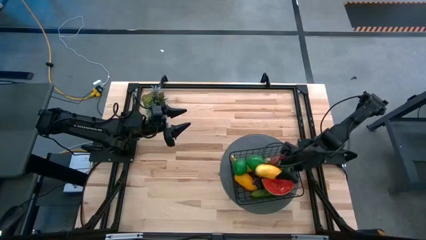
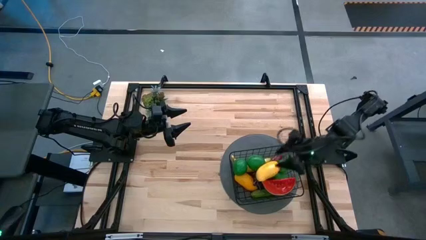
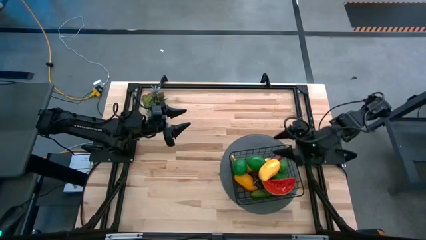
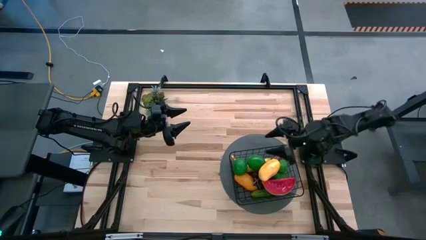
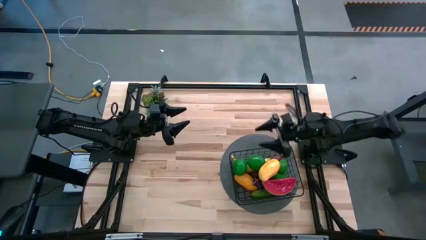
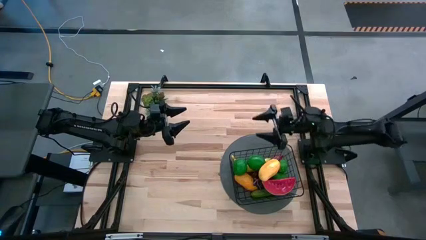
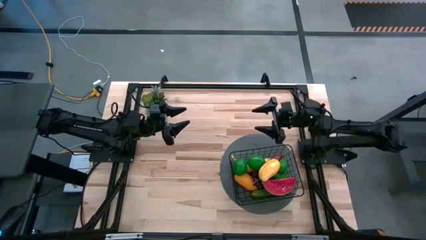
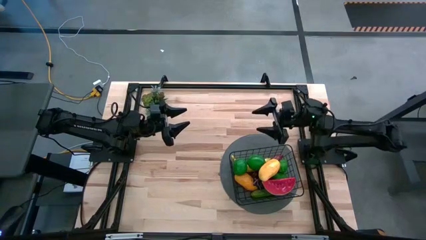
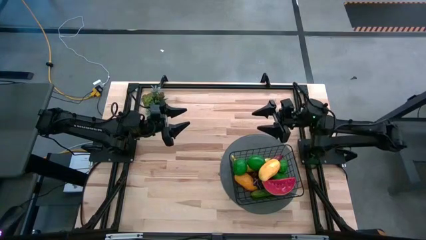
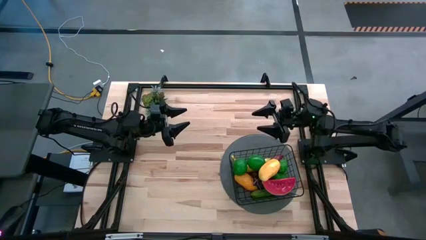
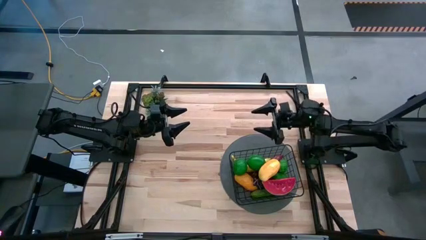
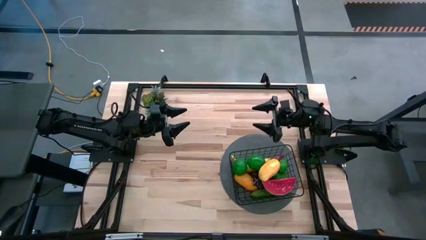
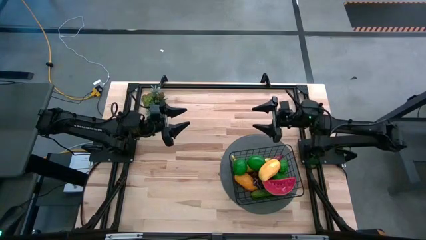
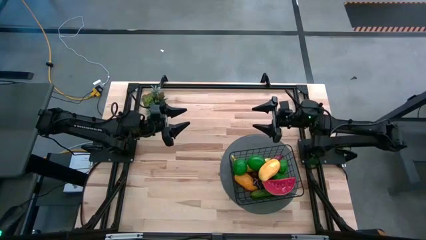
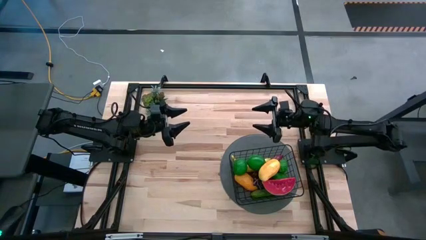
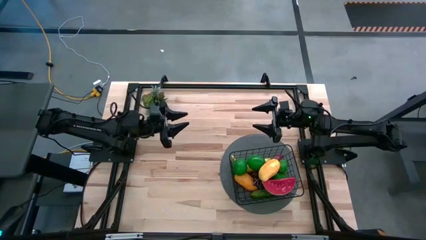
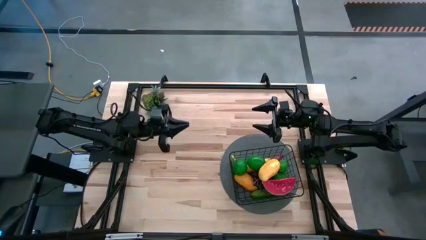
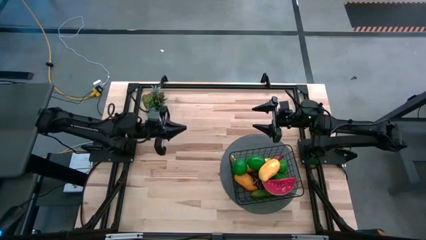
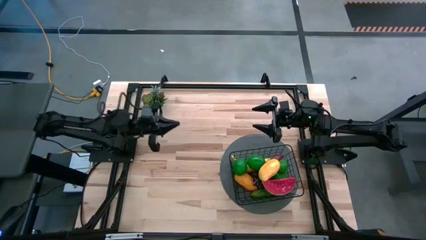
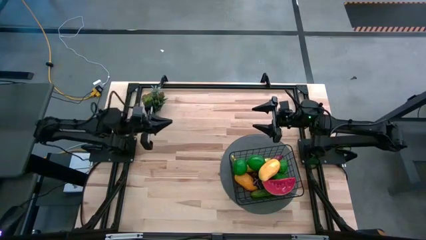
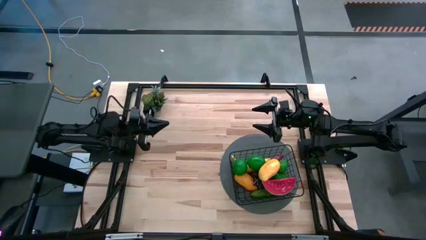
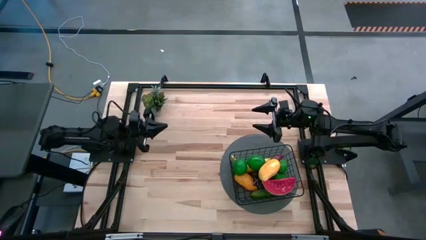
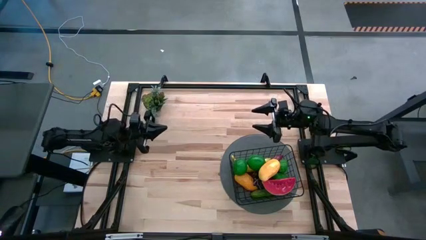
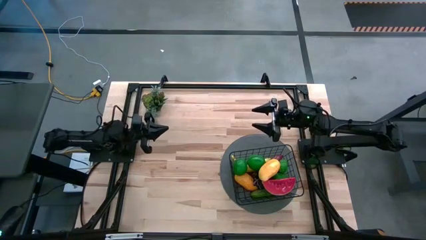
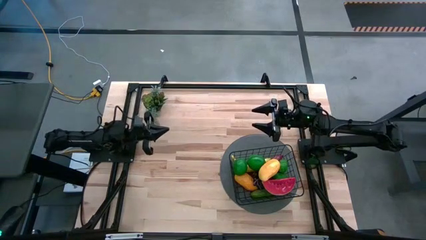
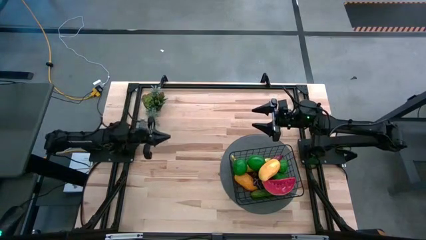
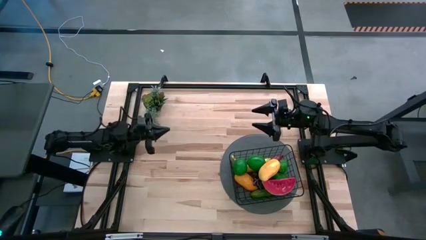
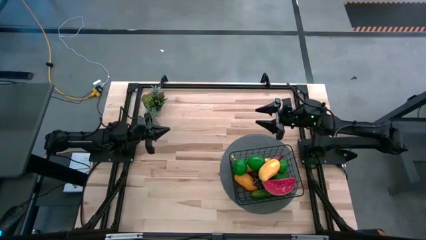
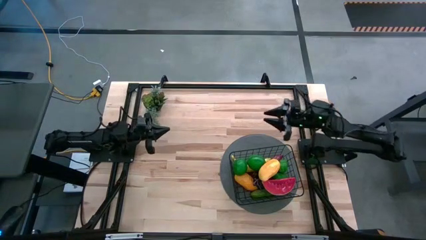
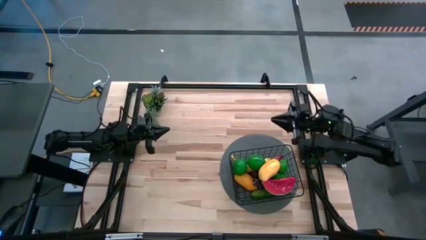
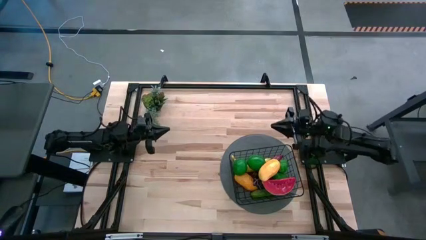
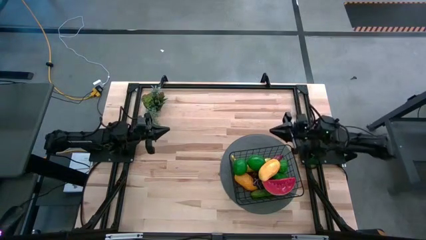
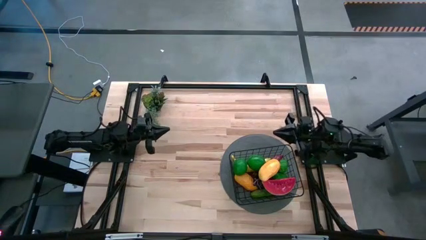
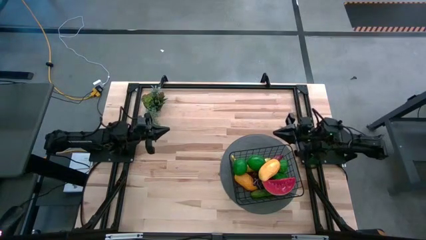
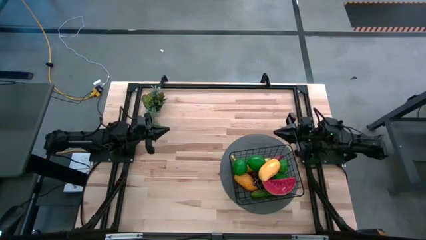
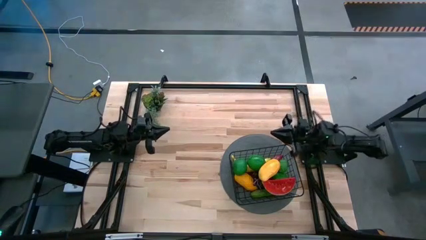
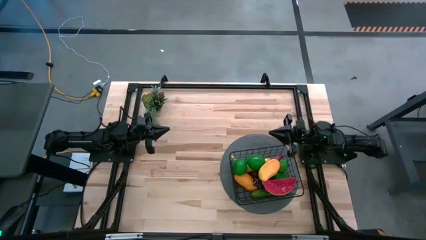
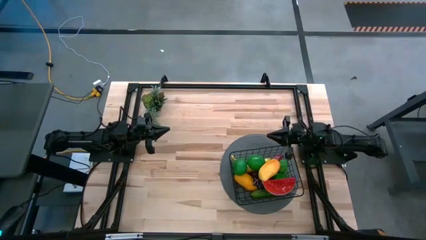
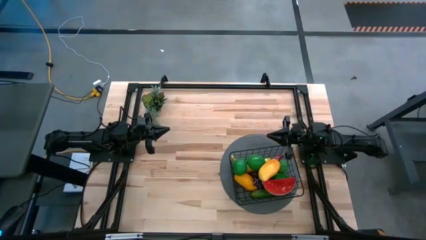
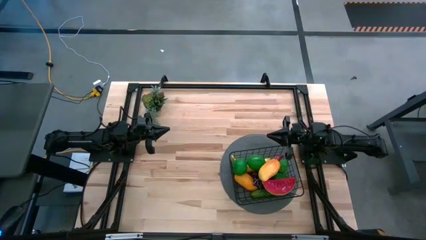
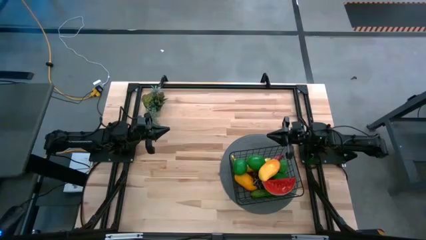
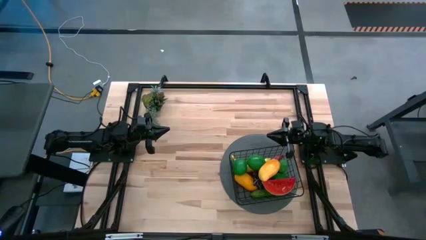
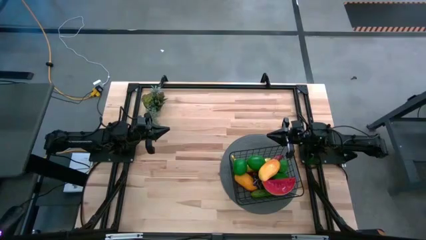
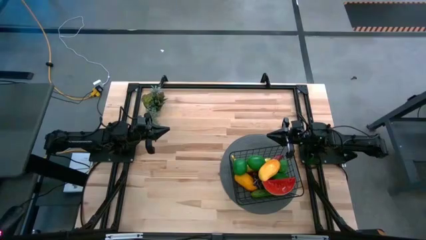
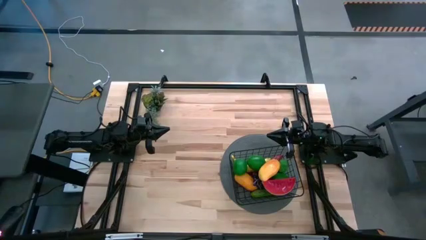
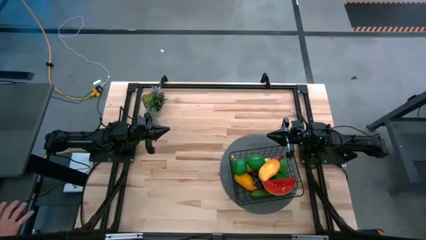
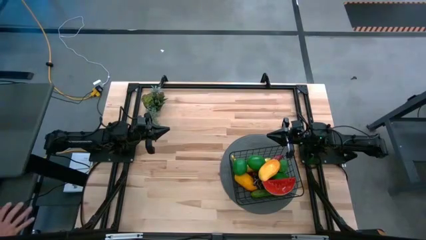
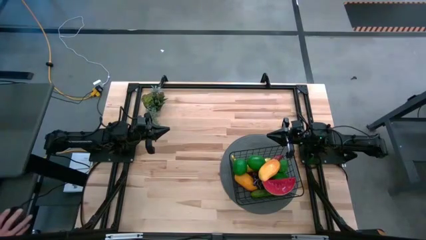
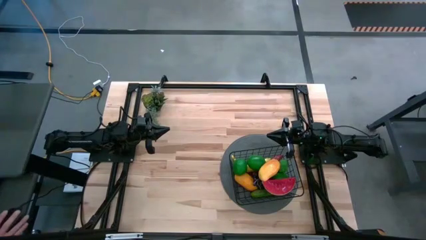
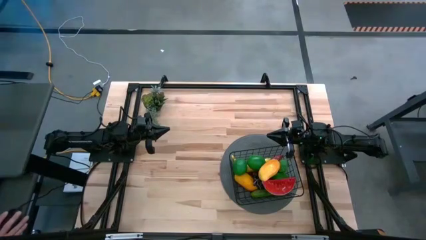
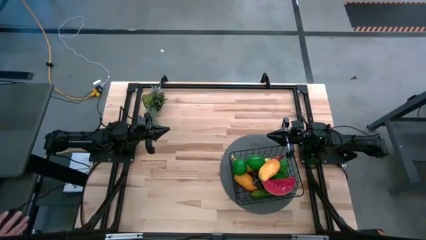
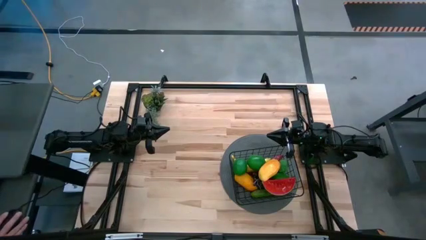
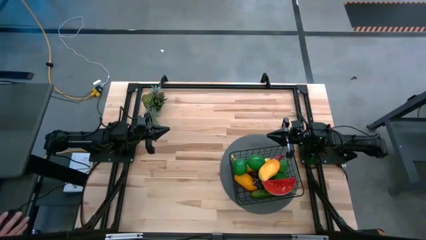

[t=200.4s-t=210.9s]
Task: Build produce basket
Return to Home Position

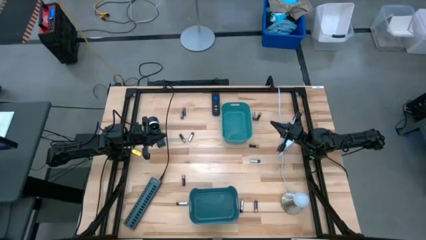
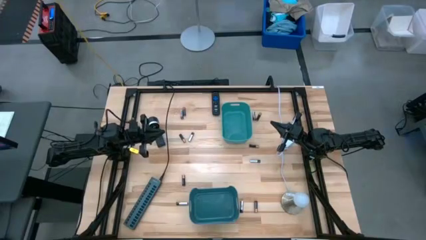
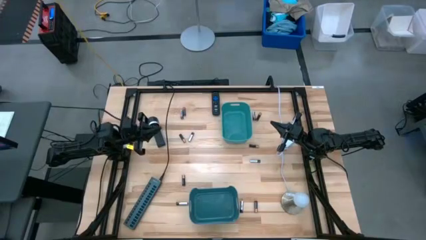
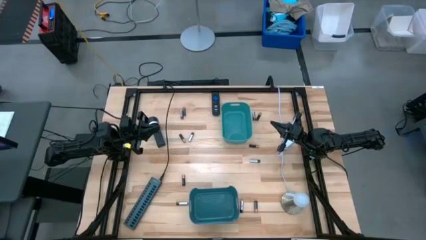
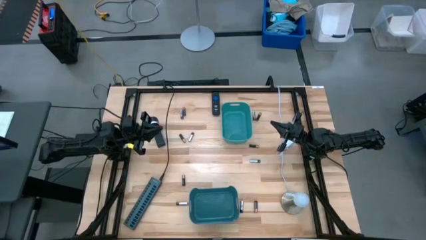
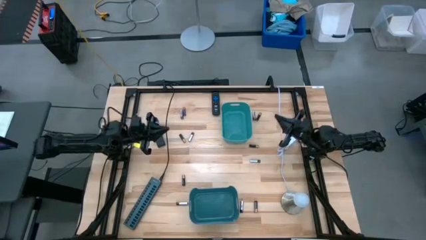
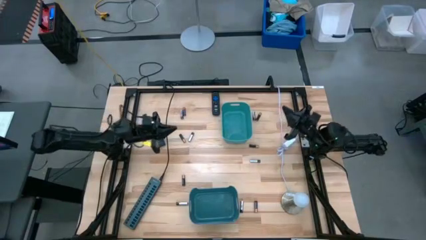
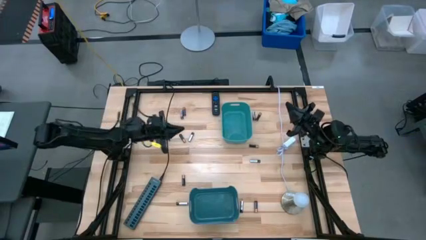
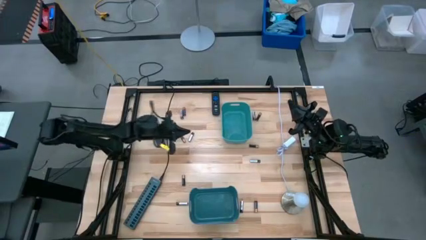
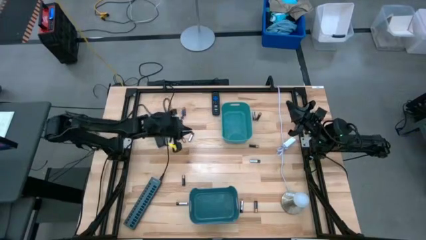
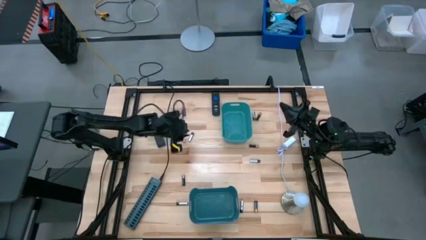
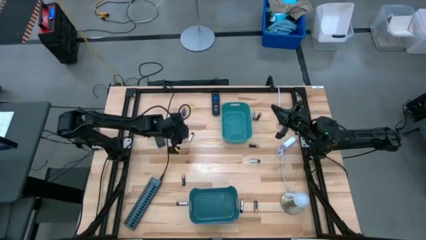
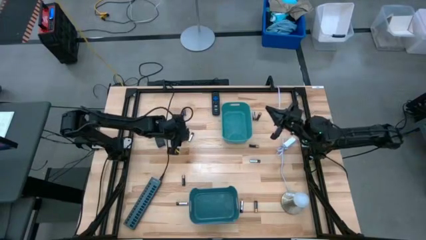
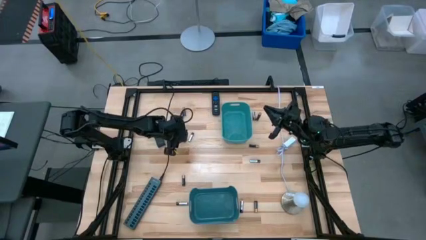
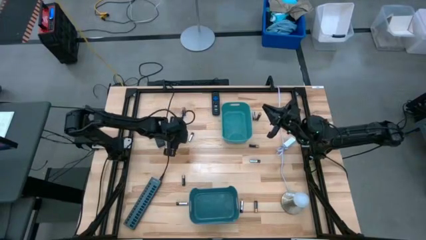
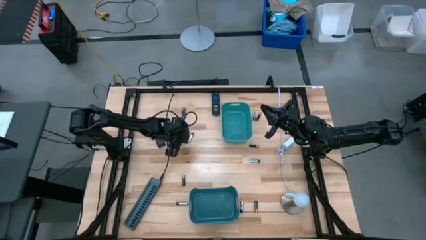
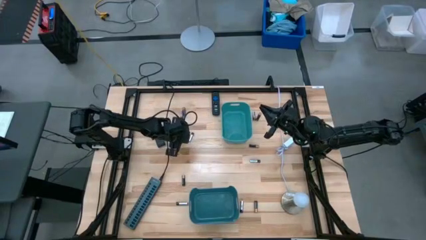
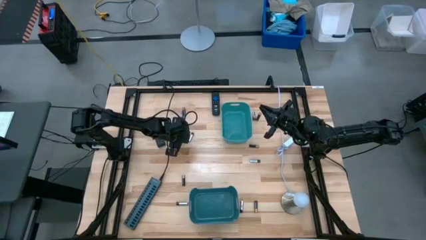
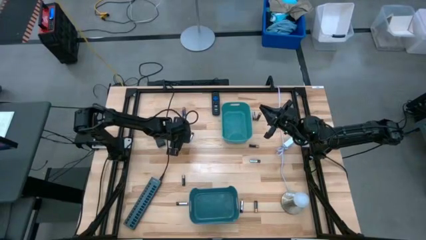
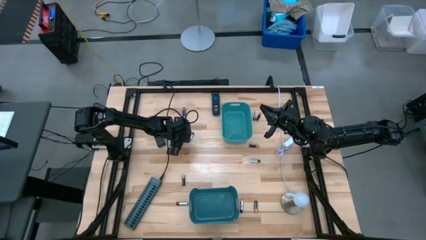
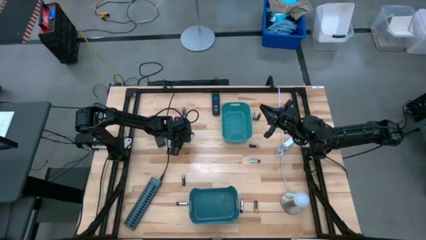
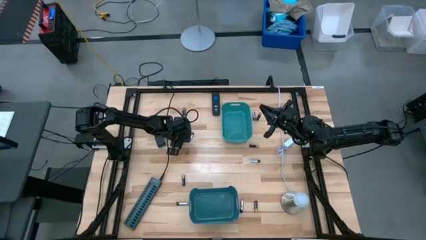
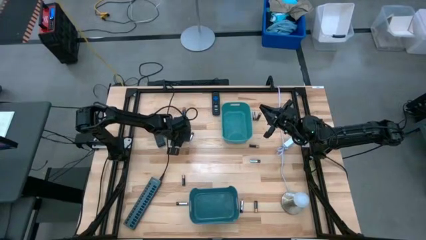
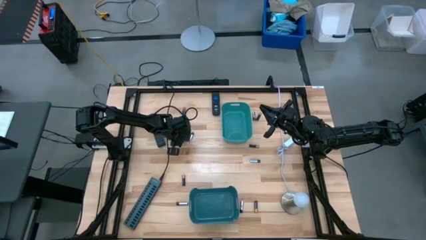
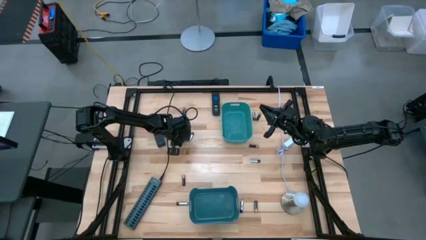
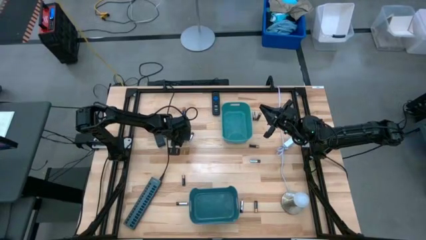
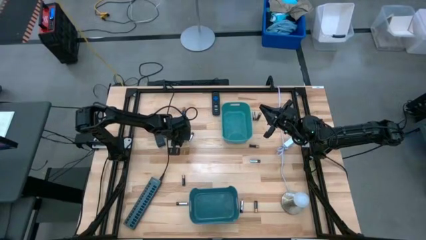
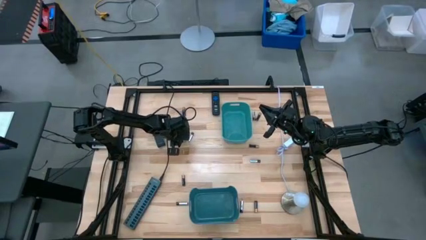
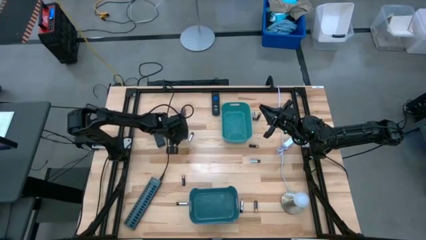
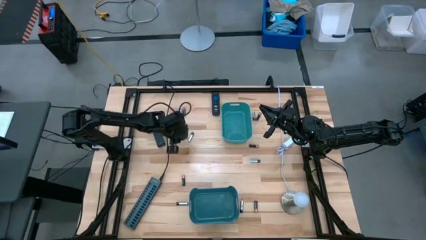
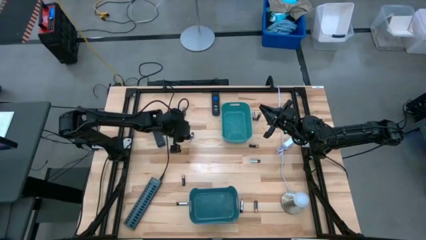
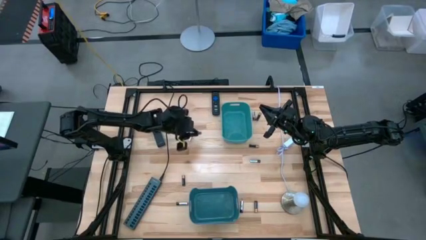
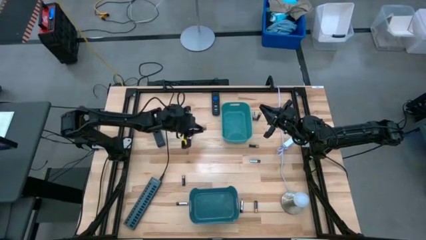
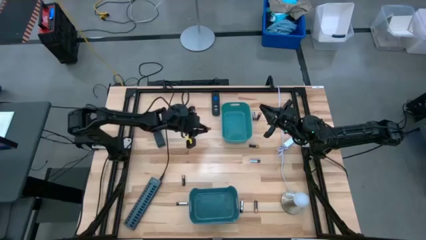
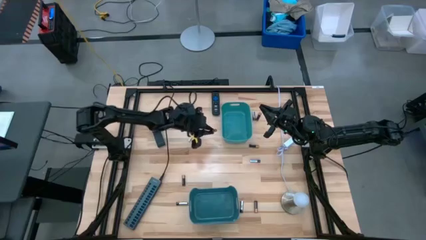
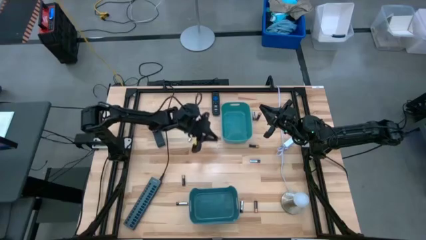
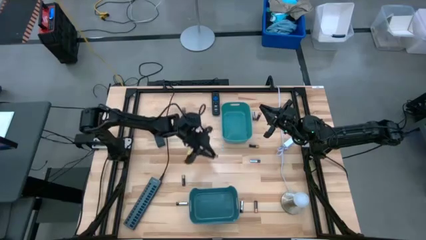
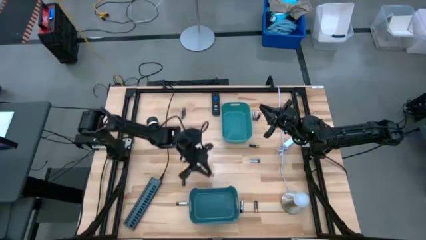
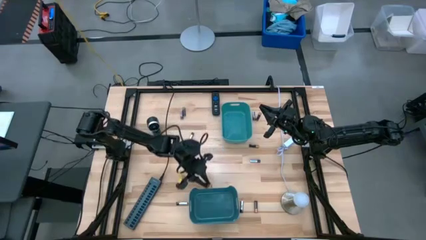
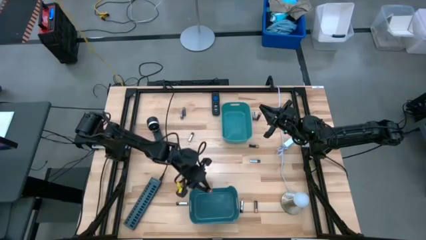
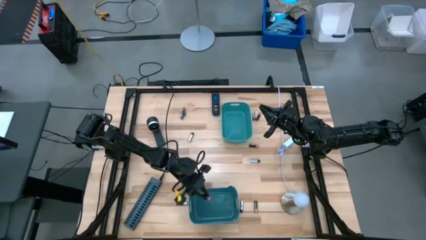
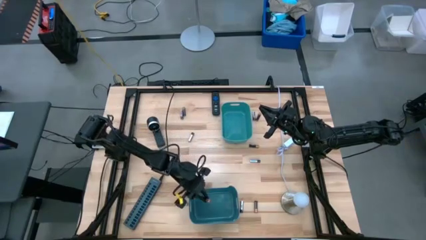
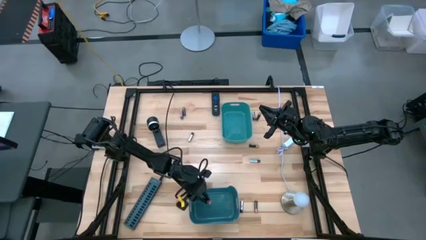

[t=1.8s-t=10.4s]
Task: Sort batteries
Put the black battery into the blue bin
